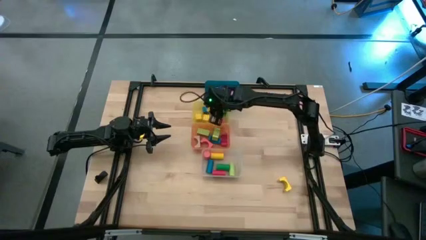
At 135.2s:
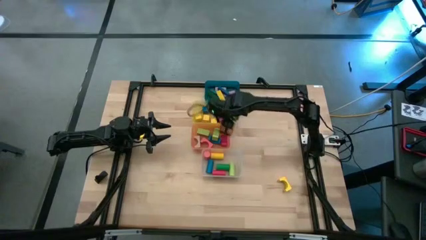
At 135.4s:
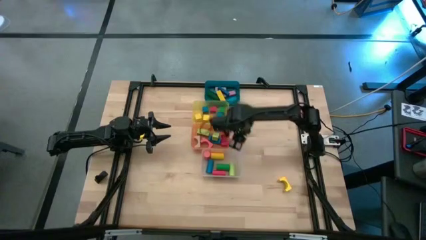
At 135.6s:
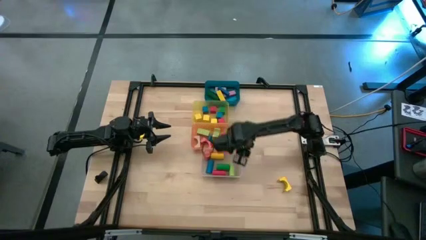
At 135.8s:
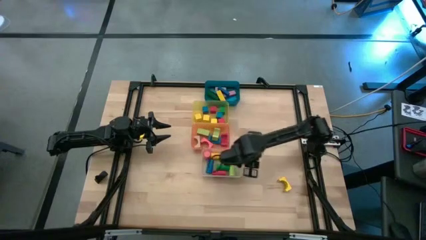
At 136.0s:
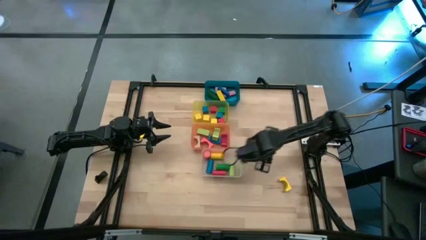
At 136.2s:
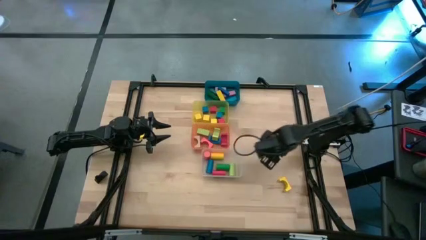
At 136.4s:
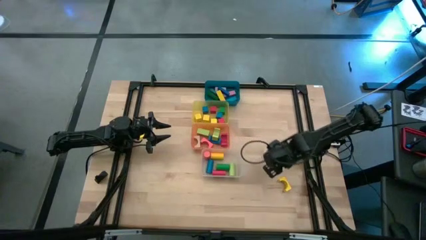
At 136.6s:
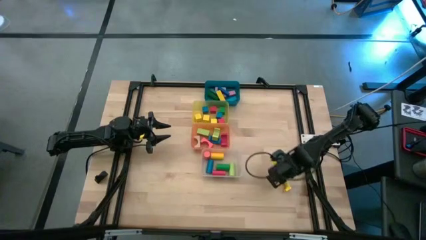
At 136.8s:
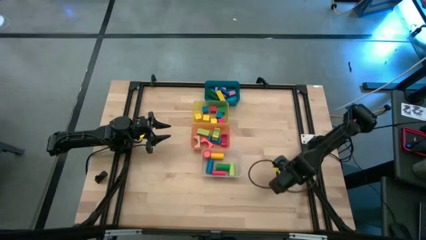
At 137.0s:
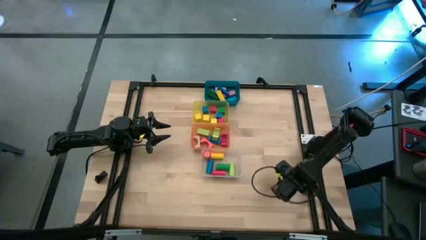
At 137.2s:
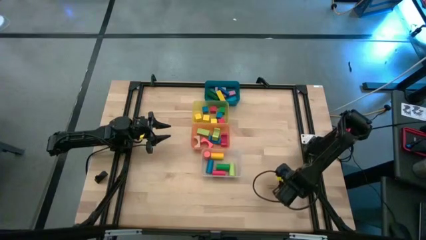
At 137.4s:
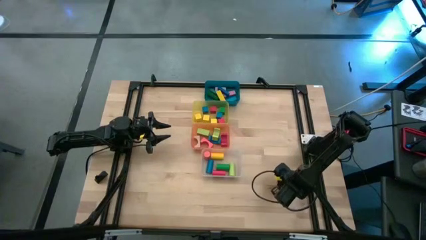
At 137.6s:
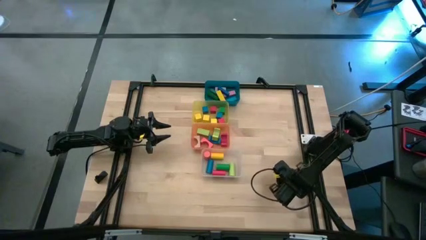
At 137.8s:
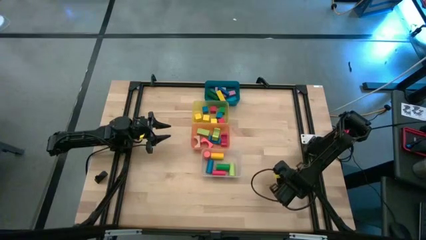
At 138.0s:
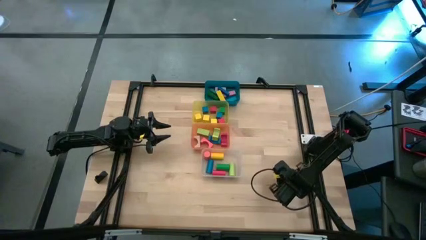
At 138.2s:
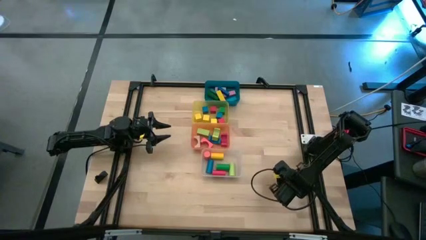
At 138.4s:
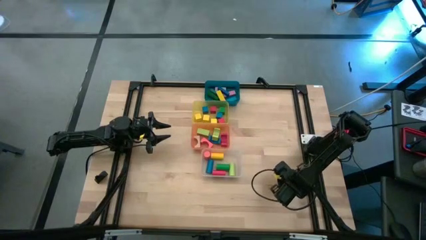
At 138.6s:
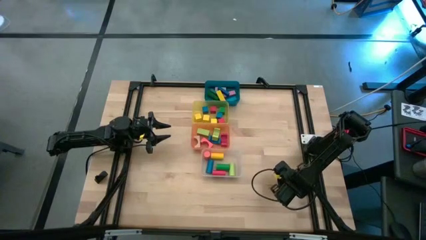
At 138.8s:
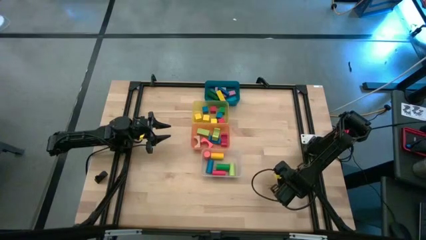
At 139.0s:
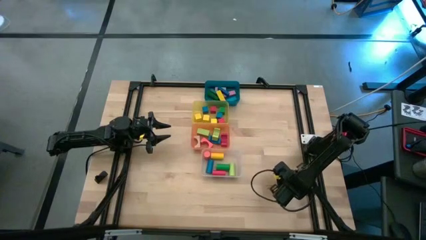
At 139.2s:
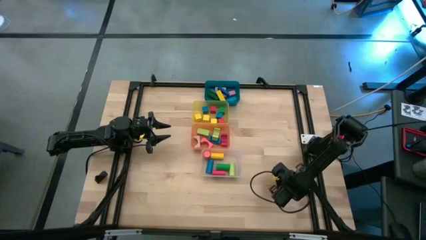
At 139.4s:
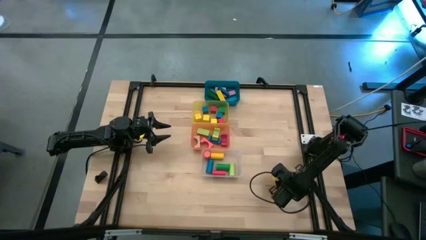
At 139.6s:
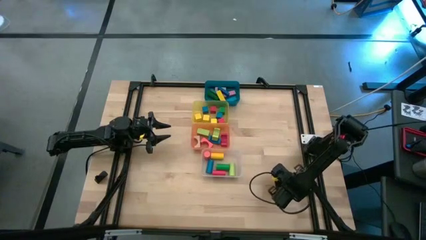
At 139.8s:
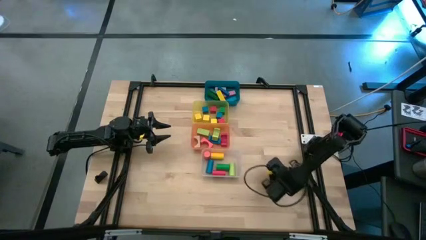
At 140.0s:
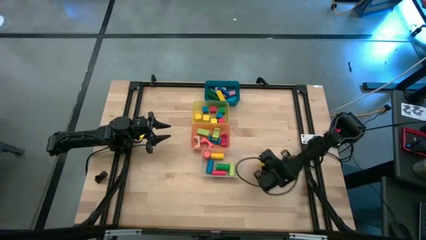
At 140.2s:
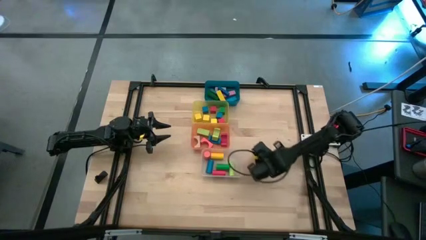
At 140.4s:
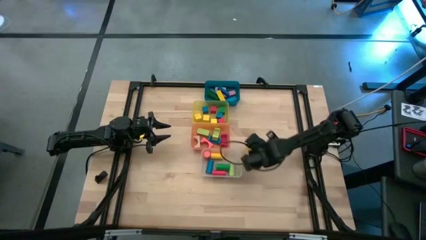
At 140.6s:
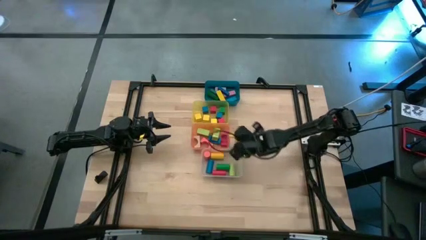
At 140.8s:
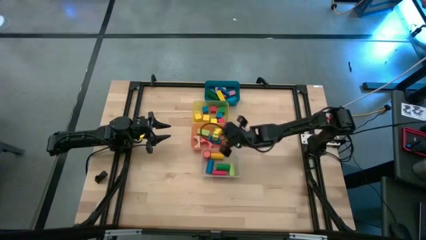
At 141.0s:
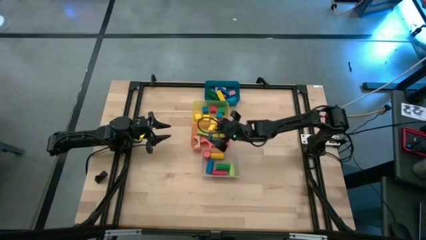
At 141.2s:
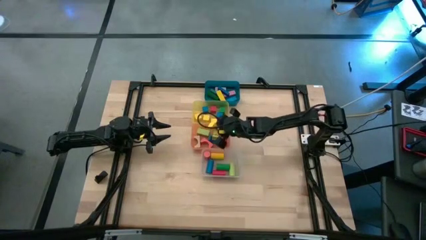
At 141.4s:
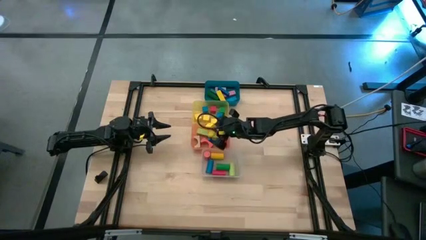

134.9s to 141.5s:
Task: Sort blocks by size
Put the yellow arch block into the orange bin

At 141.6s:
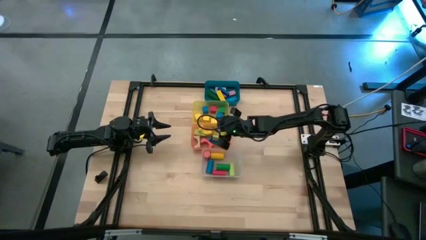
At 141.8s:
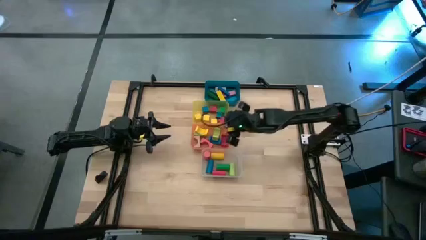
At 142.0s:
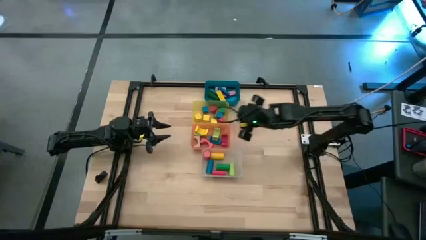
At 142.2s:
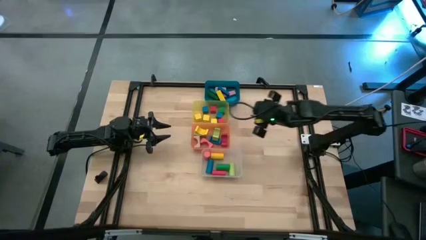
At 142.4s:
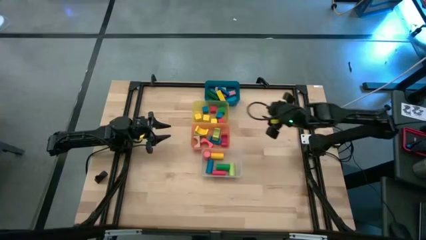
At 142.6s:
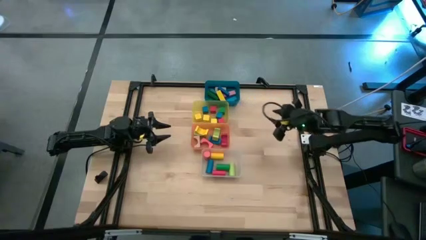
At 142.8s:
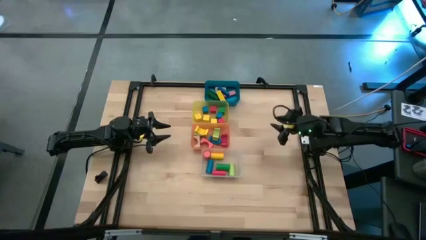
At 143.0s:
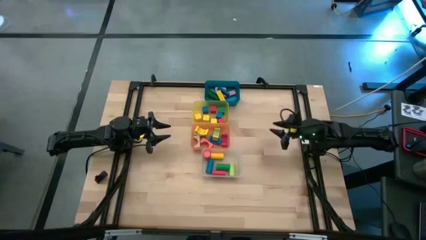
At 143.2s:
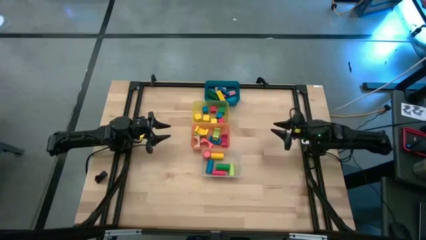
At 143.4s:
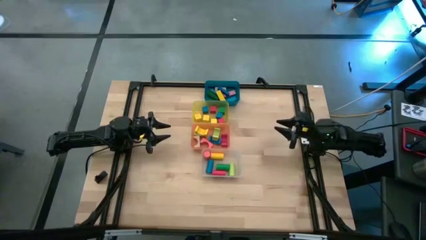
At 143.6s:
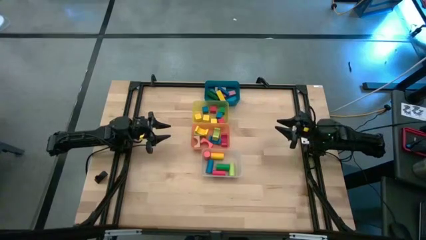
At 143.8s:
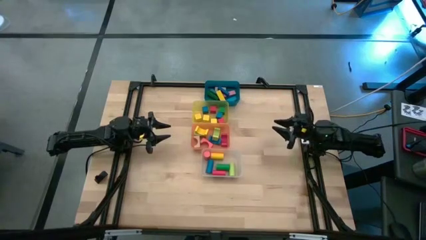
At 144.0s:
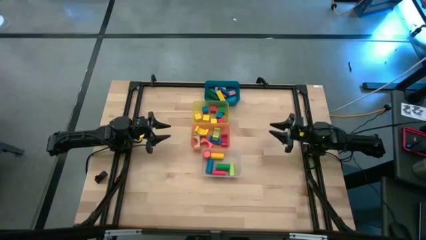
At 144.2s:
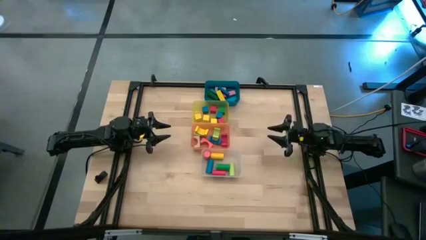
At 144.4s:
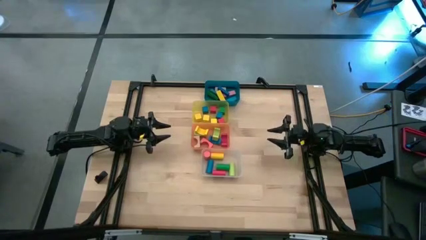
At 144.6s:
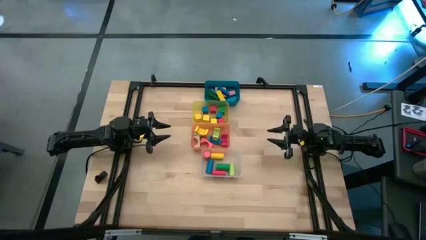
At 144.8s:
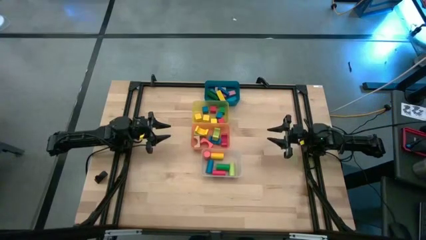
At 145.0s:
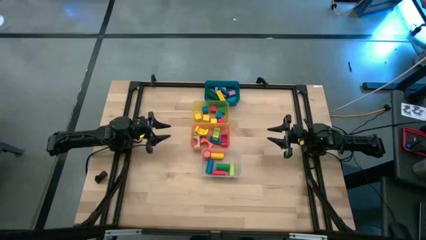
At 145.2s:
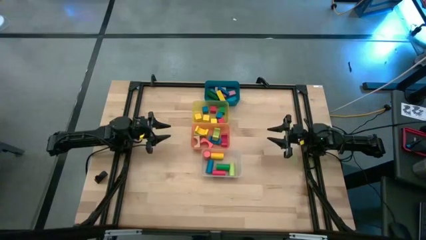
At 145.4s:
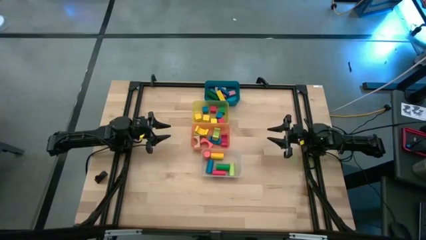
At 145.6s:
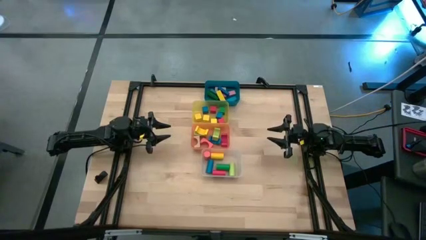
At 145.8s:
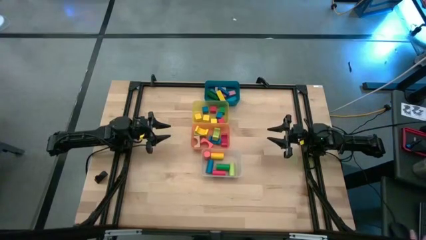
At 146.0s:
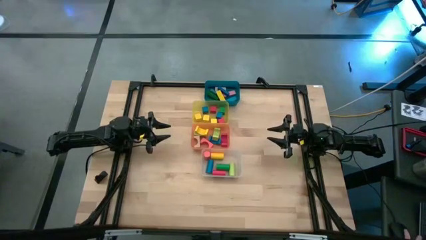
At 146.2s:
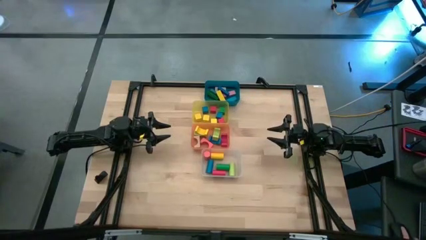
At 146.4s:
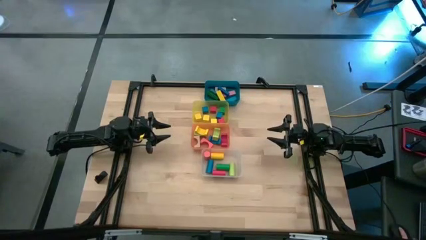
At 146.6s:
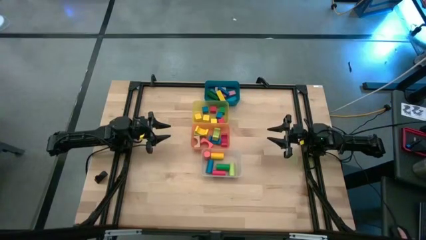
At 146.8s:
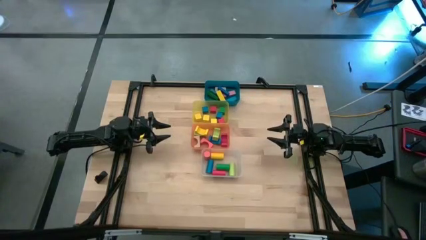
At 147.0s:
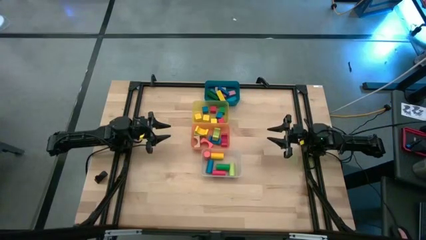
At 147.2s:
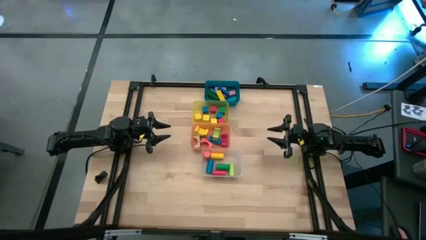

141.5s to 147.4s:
Return to Home Position

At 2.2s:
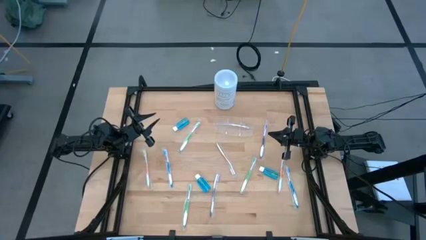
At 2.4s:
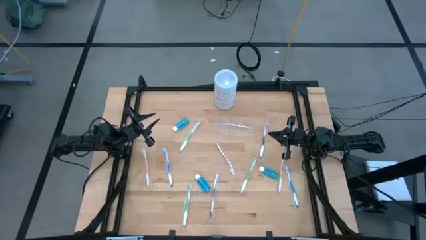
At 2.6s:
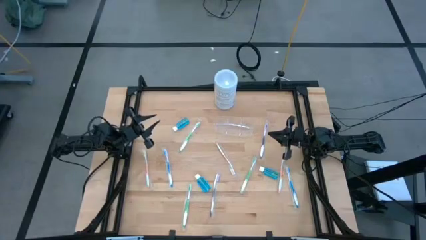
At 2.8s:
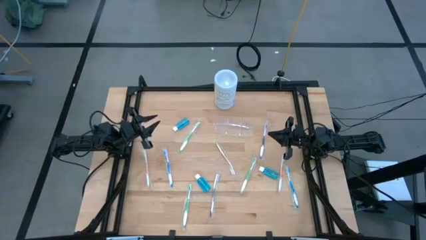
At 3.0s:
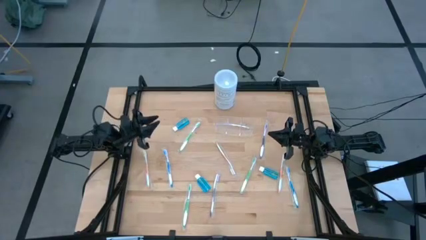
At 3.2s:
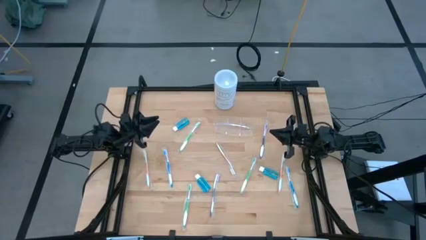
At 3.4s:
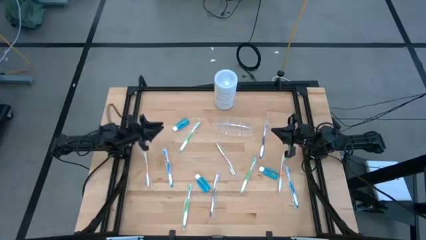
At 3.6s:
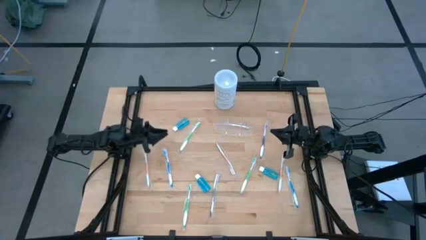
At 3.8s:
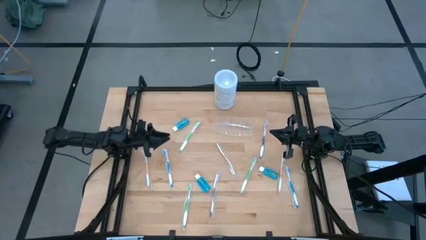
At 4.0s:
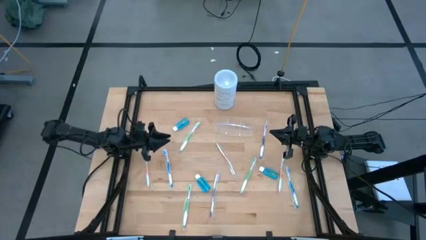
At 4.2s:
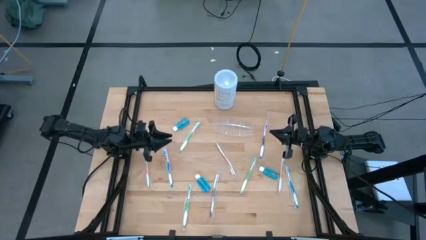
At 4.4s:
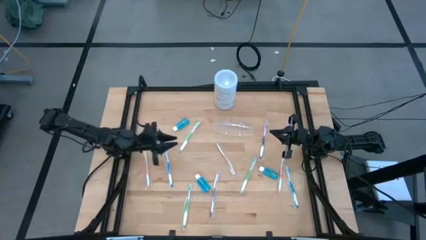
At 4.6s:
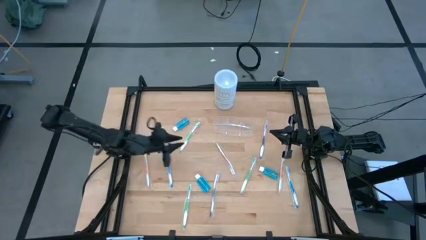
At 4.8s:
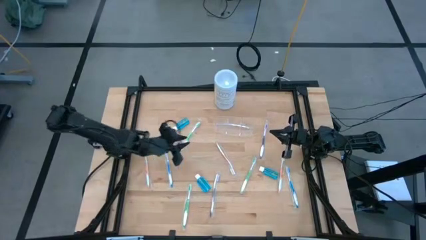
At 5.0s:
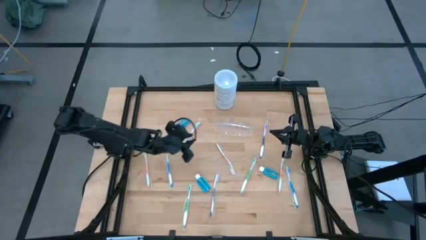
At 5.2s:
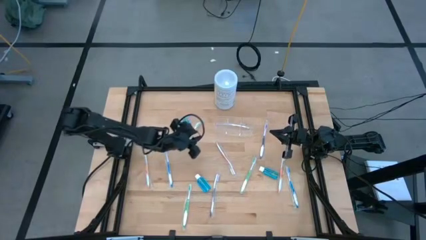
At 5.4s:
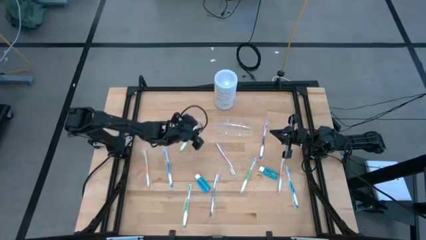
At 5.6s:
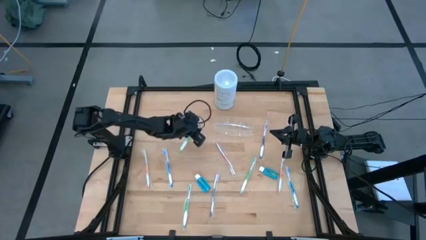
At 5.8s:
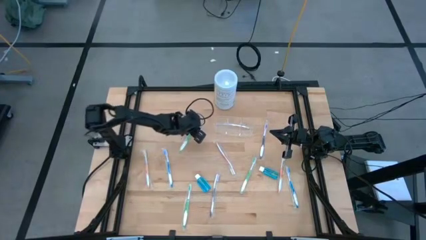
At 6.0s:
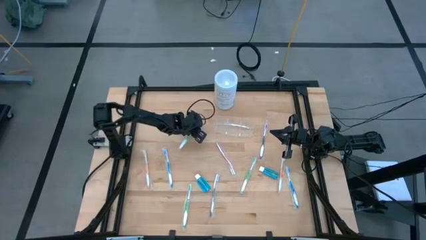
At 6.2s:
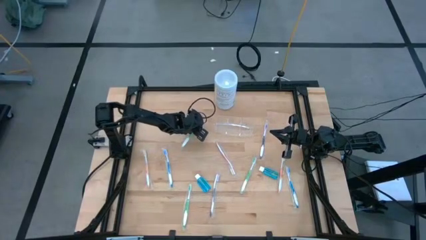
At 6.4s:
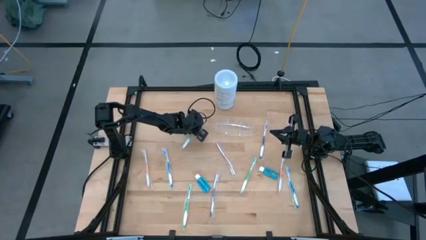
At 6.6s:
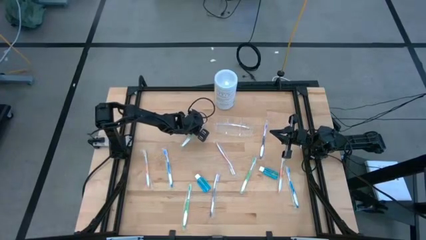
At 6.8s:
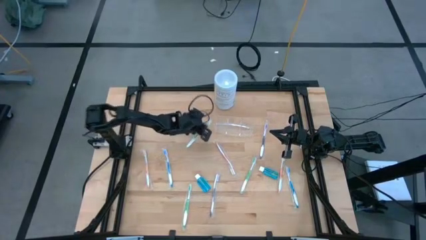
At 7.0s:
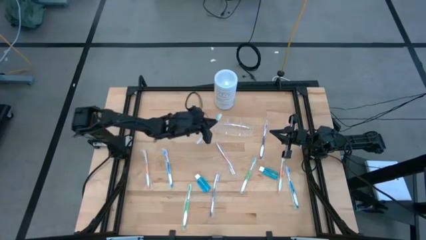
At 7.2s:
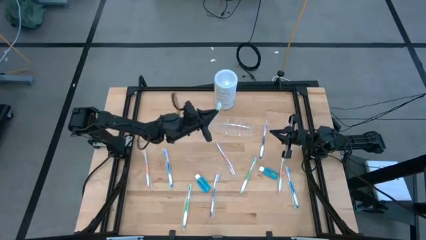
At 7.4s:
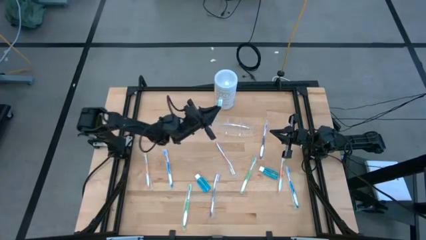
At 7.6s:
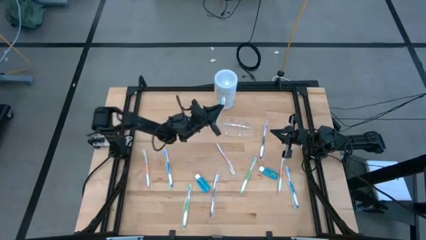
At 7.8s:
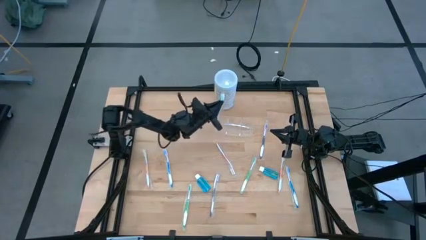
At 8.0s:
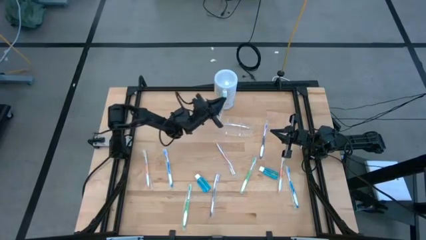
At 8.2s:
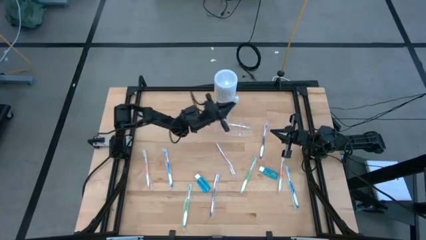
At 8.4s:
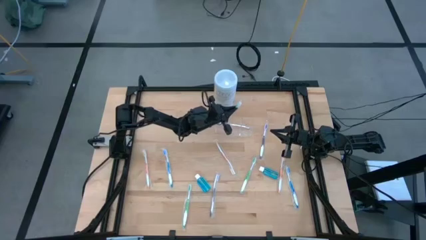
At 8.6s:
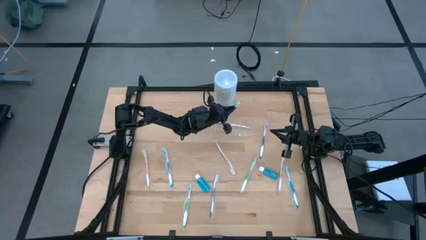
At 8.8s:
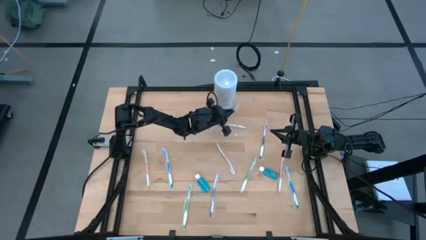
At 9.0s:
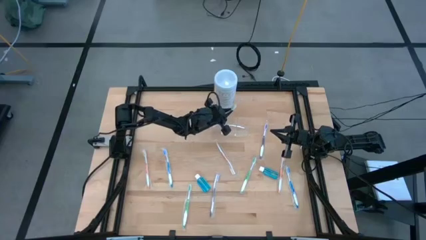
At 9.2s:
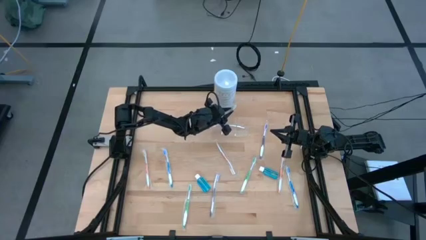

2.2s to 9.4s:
Task: Pick & Place toothbrushing station
Put the top green toothbrush into the transparent organizer
